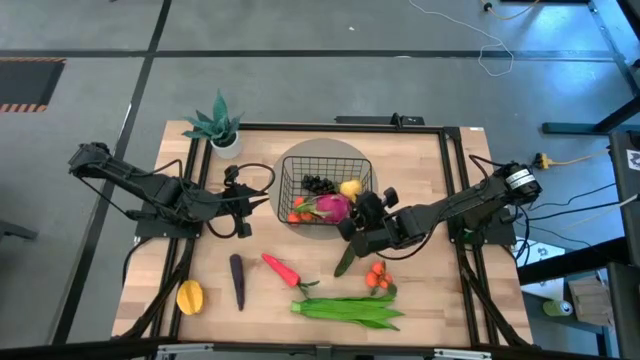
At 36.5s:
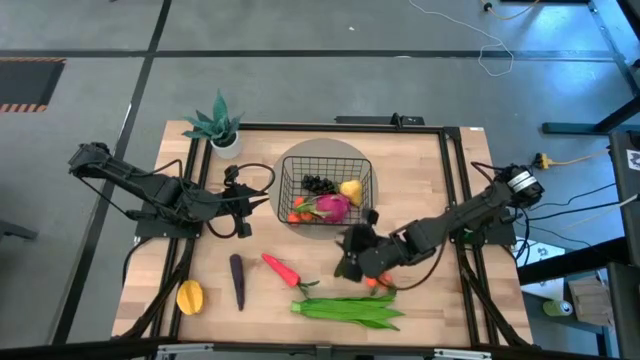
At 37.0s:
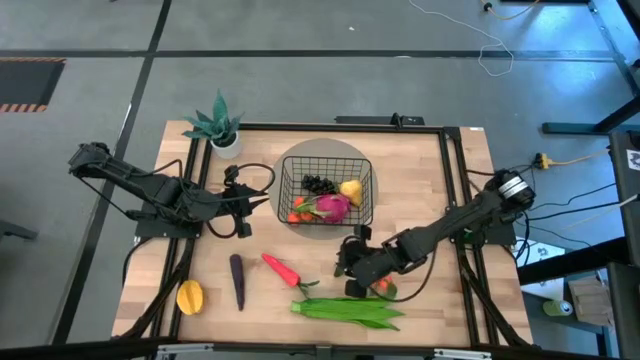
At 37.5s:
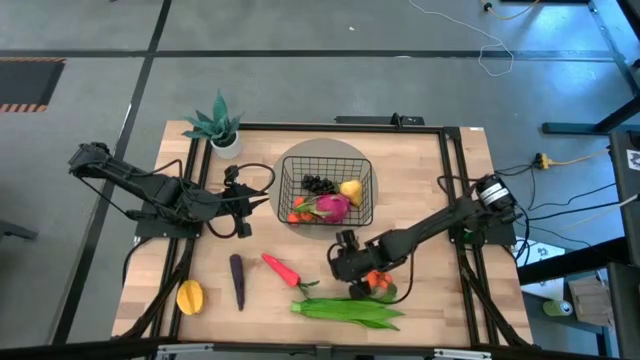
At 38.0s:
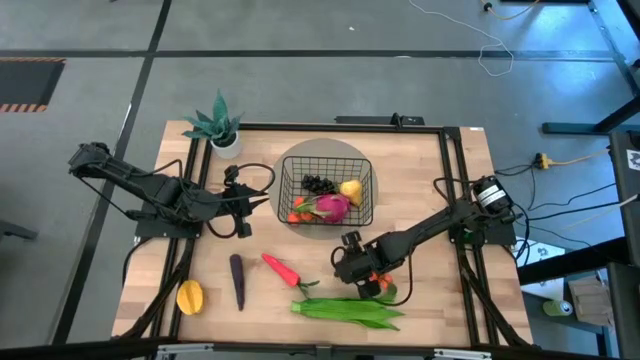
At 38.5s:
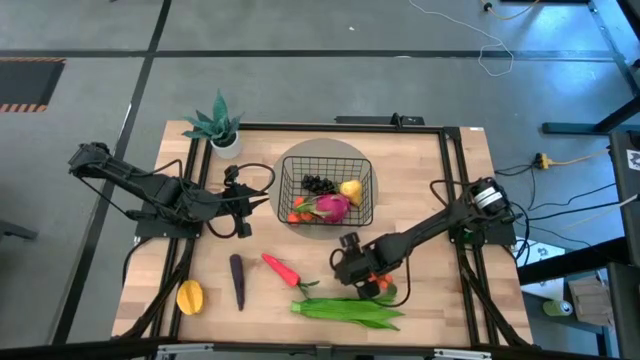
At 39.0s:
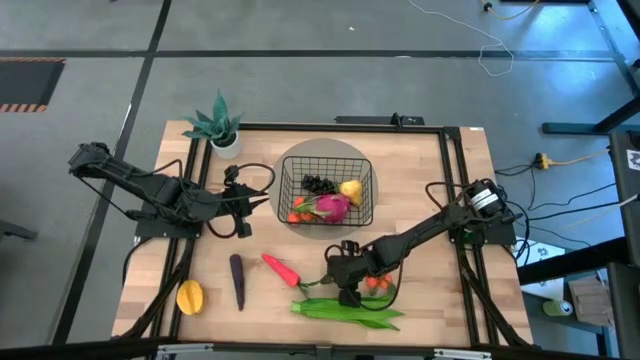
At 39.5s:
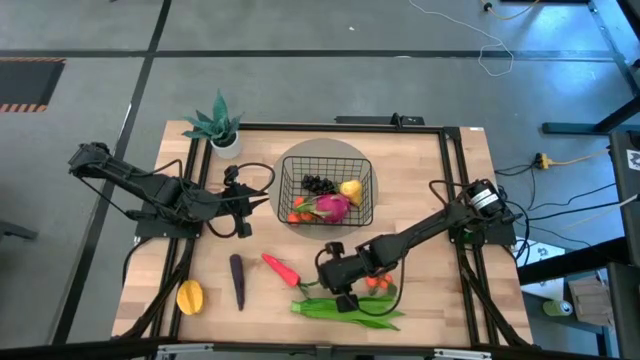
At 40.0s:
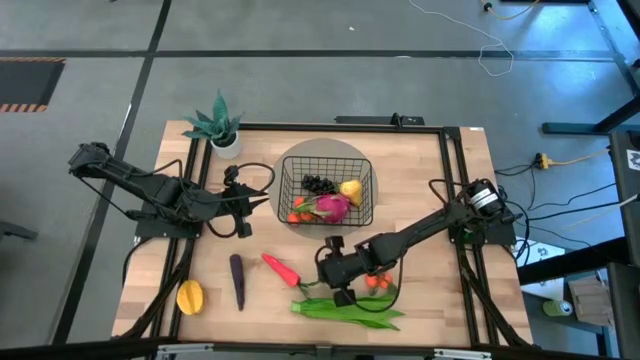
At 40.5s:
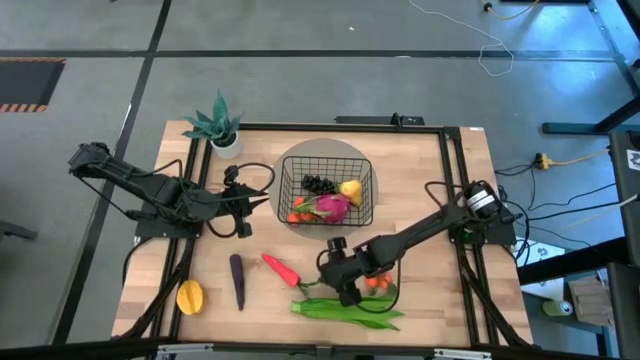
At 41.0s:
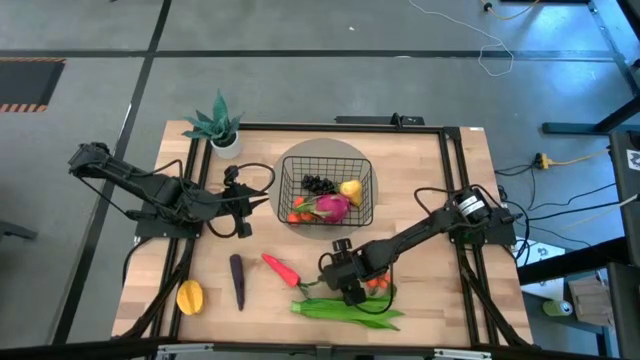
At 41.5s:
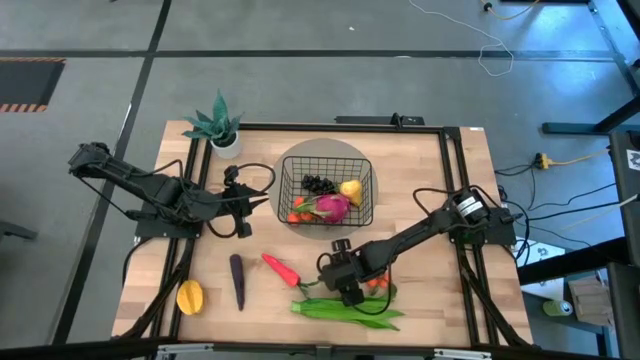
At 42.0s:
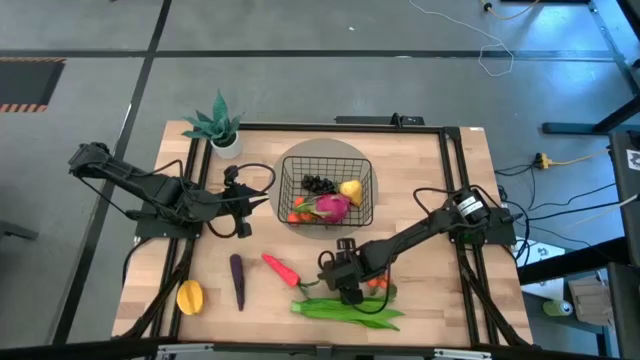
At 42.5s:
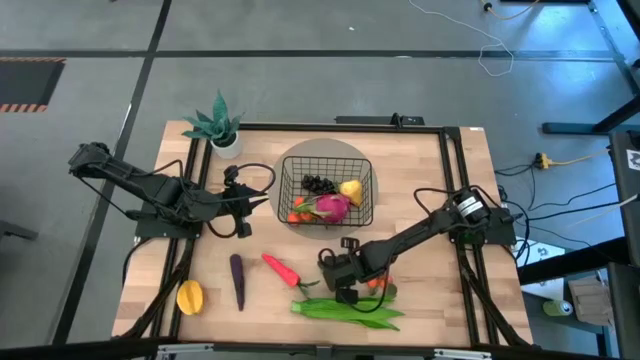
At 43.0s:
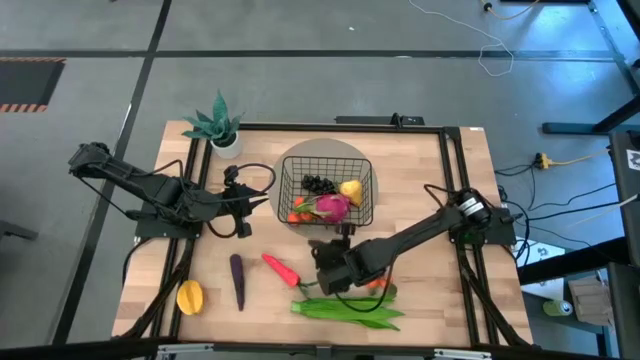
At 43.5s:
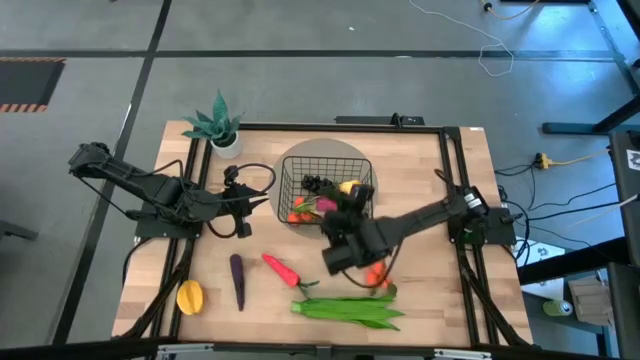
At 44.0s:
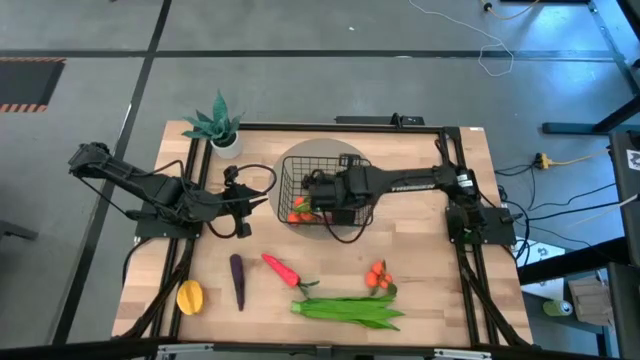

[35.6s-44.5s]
Task: Build produce basket
Put the chili pepper into the black wire basket

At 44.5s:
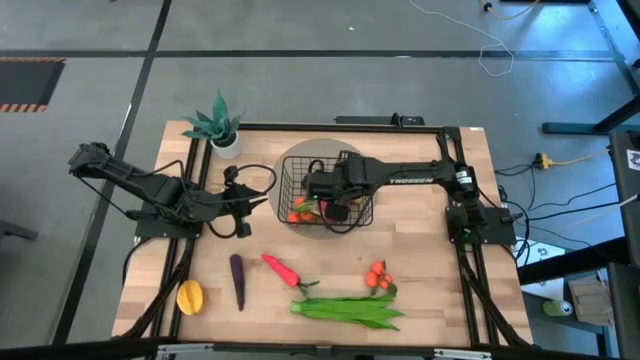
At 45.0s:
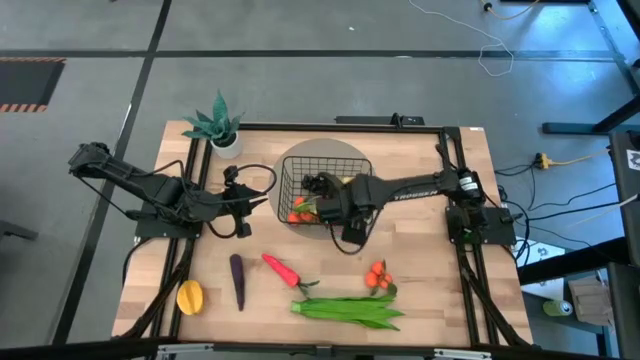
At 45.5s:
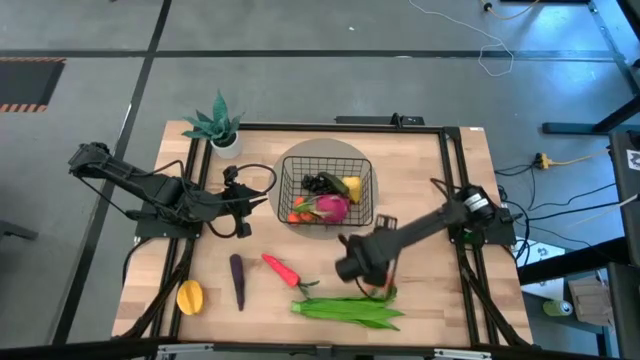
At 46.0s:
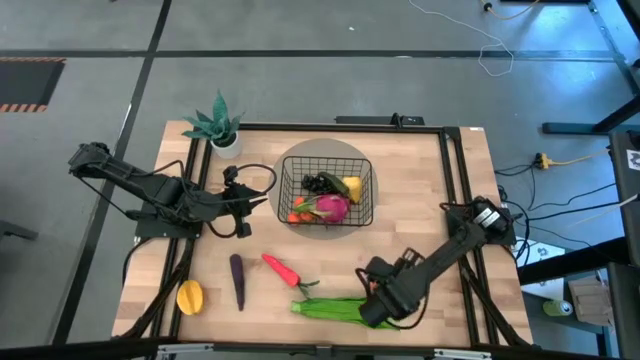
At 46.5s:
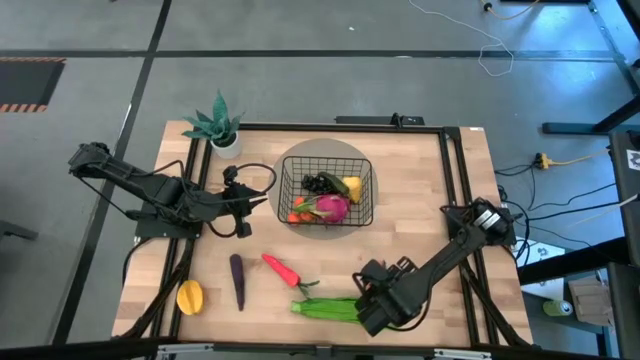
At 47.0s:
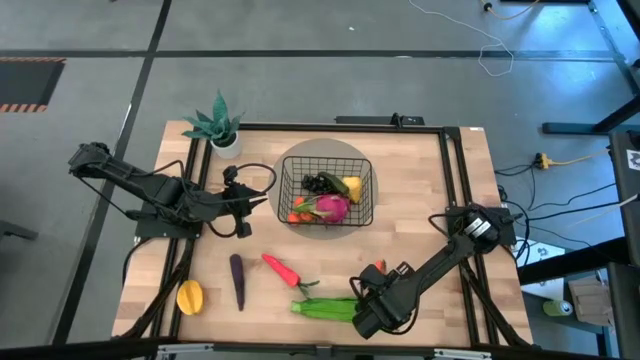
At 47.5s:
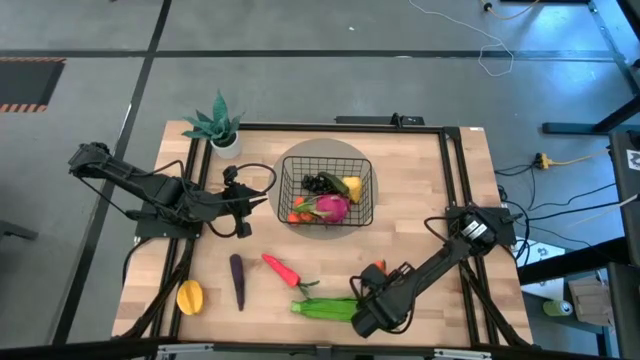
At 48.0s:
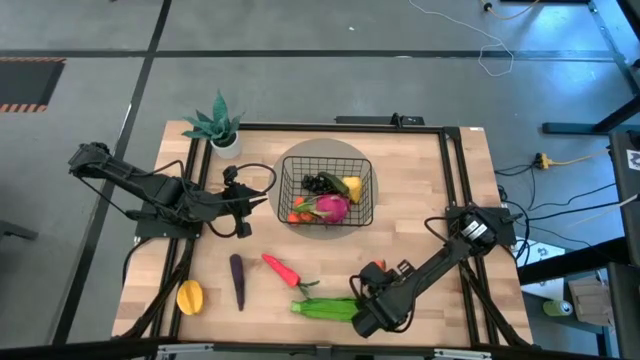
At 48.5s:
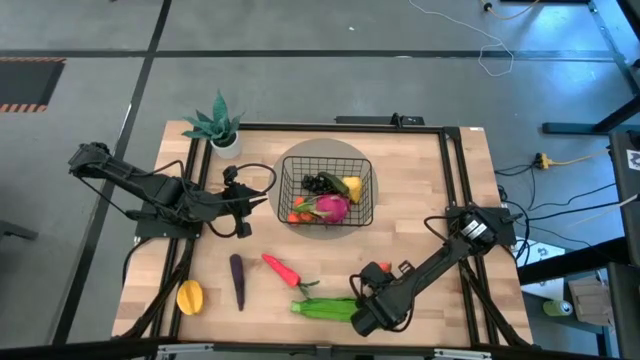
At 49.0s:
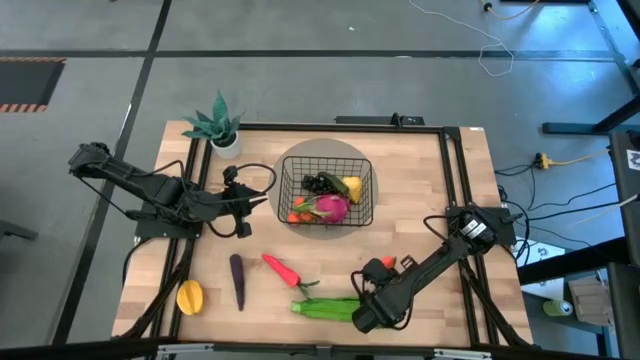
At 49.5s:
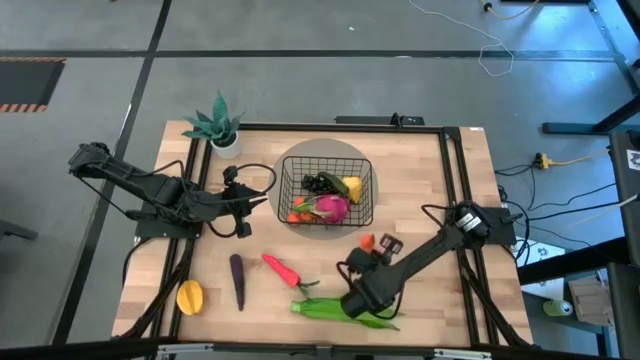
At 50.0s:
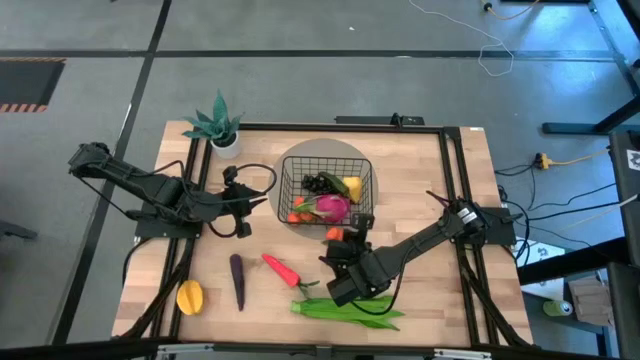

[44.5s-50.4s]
Put the oranges into the black wire basket

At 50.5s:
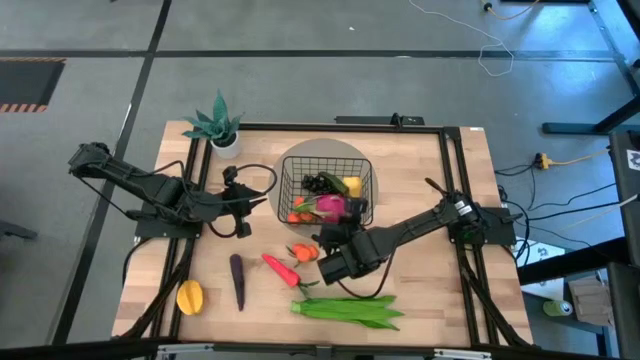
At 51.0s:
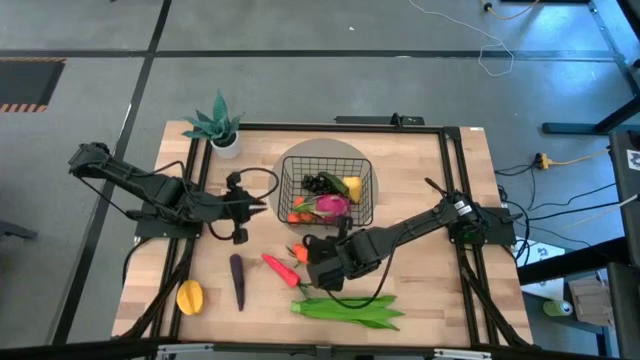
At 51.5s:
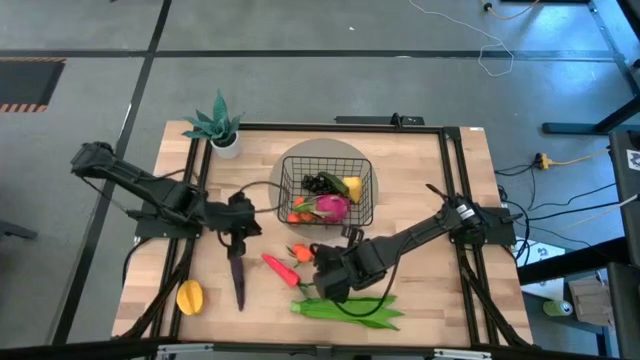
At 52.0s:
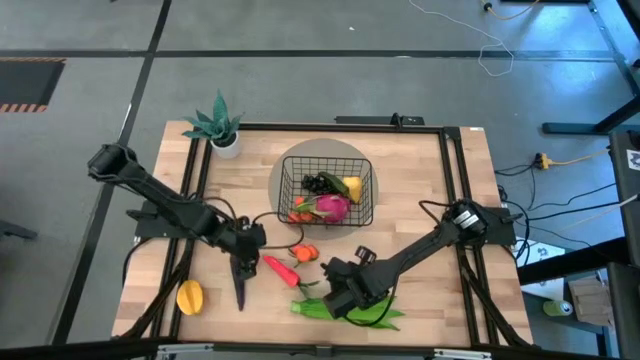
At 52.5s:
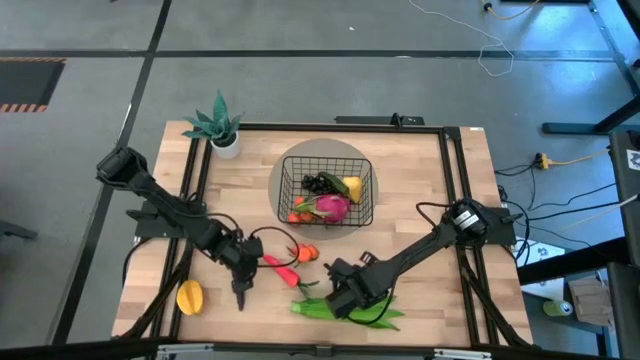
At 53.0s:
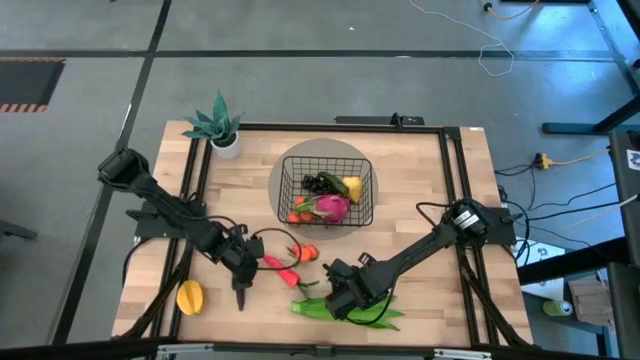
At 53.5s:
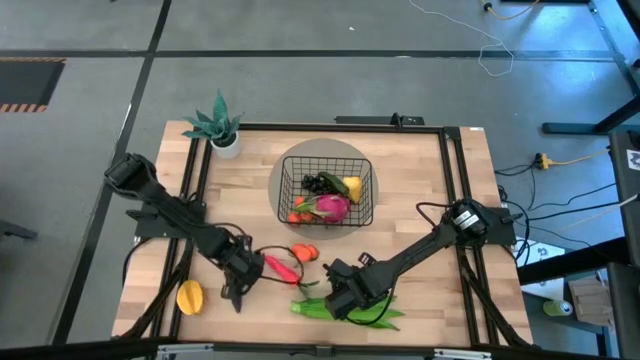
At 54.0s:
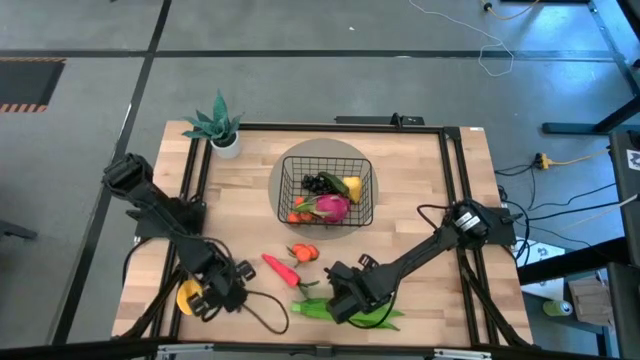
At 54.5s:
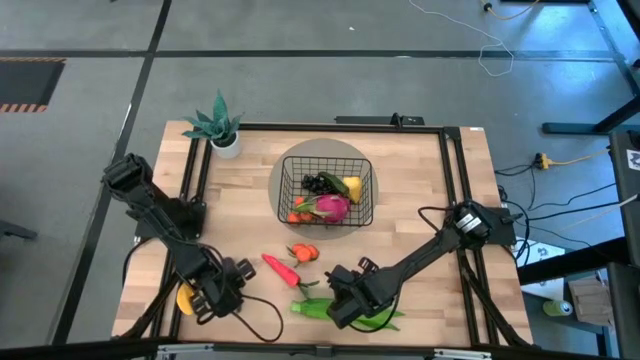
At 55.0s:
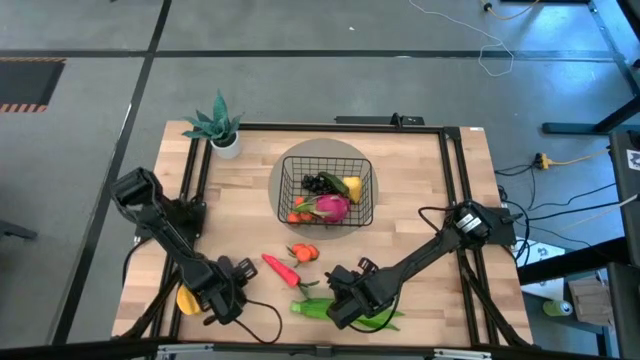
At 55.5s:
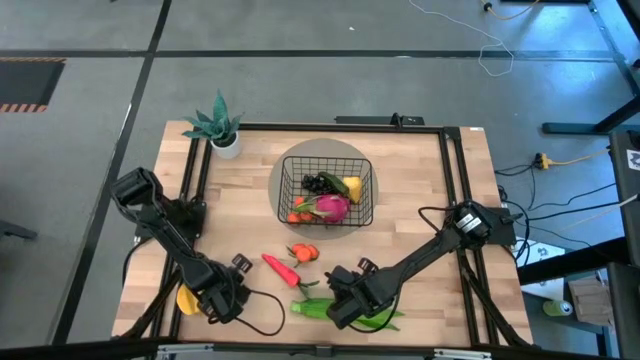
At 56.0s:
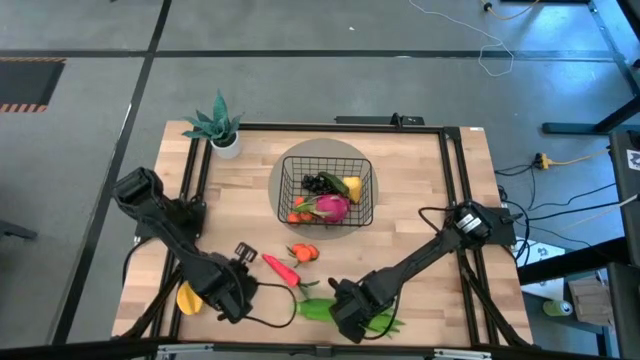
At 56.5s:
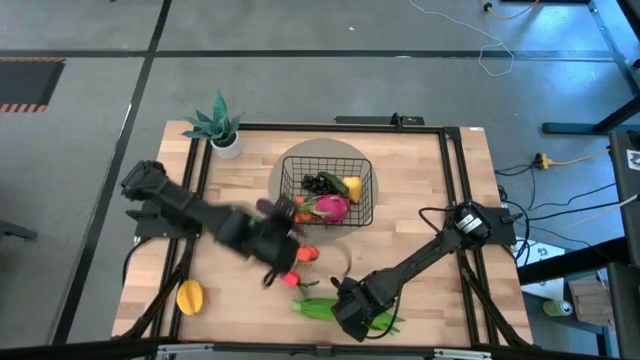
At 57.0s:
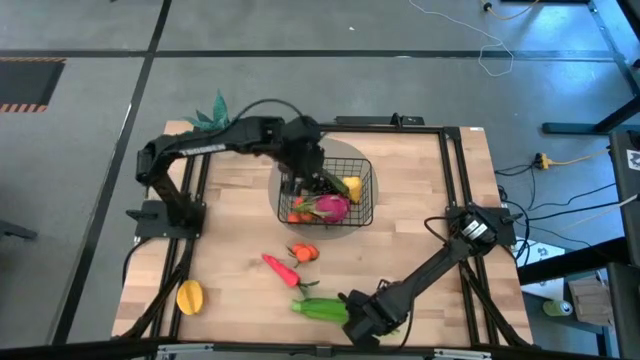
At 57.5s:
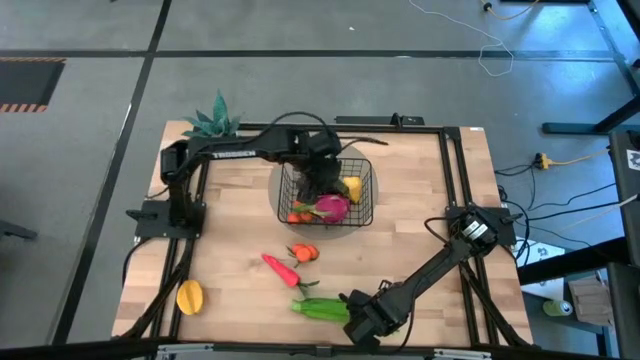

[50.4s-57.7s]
Put the eggplant into the black wire basket
